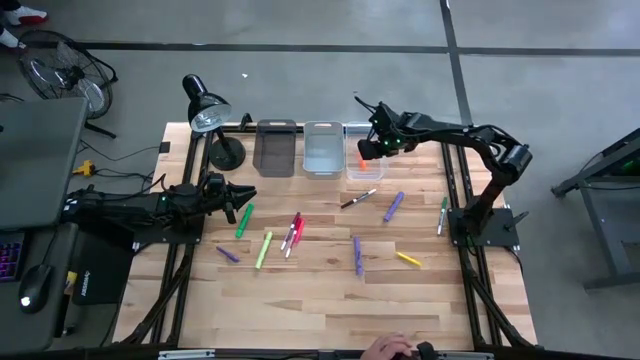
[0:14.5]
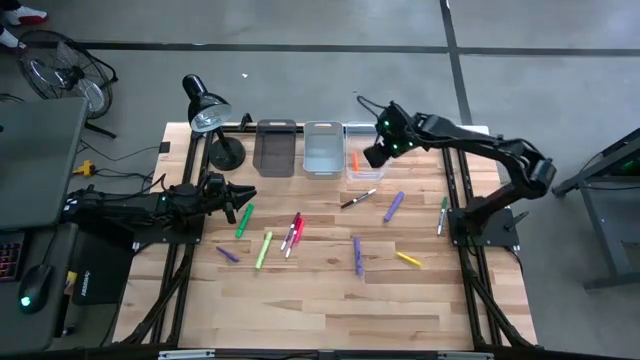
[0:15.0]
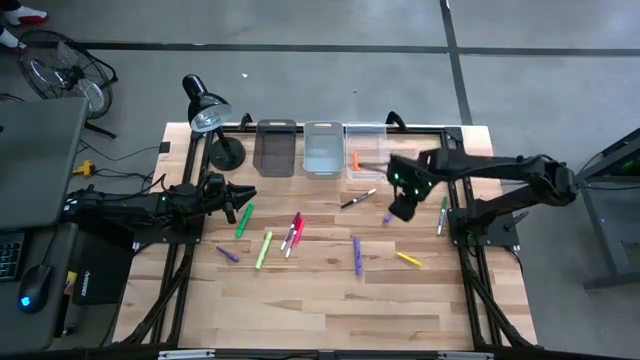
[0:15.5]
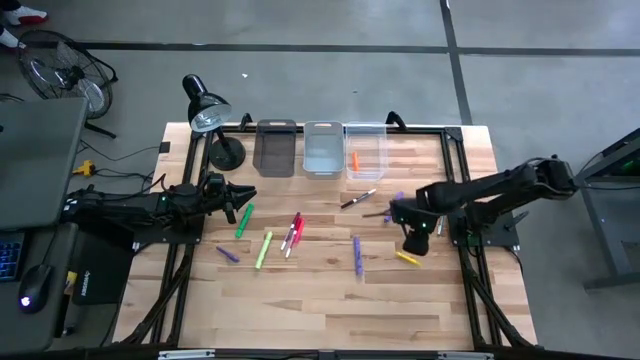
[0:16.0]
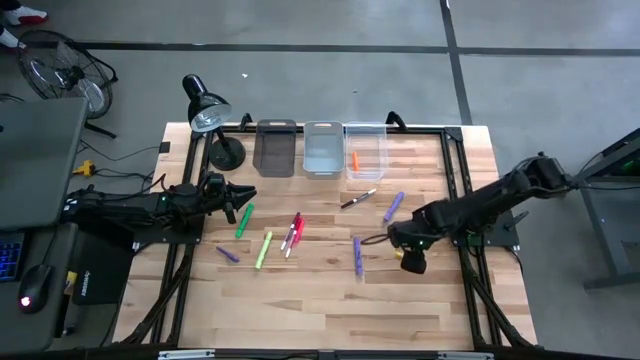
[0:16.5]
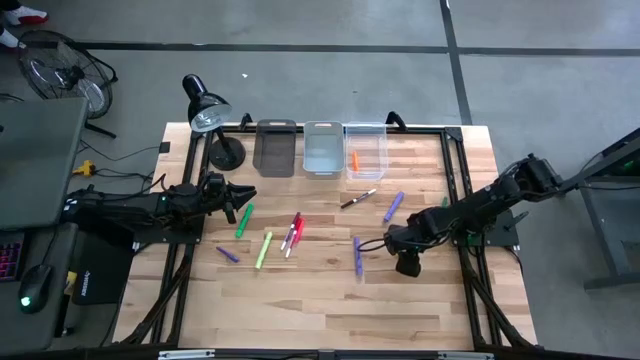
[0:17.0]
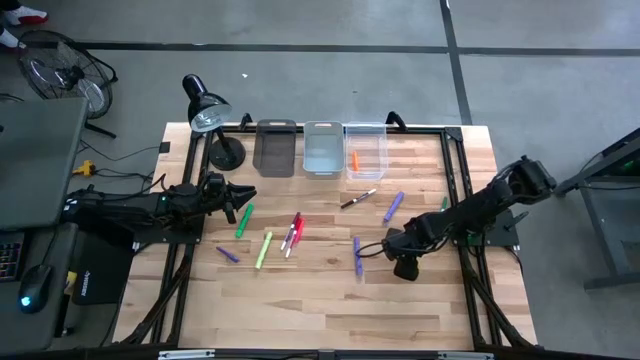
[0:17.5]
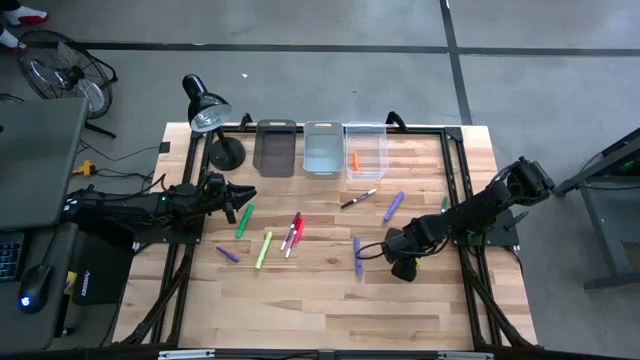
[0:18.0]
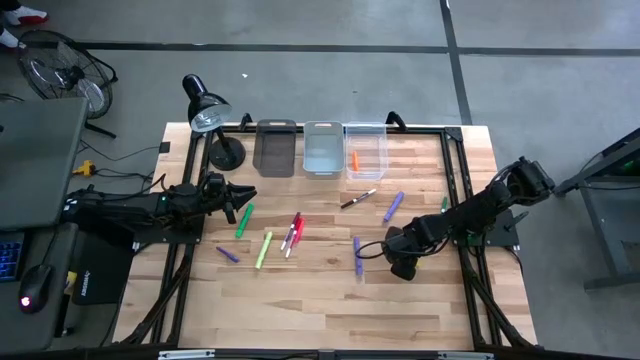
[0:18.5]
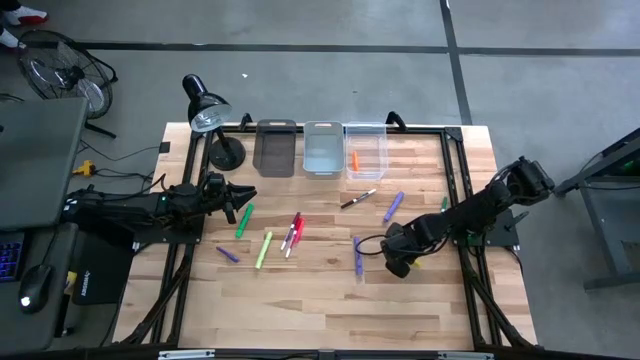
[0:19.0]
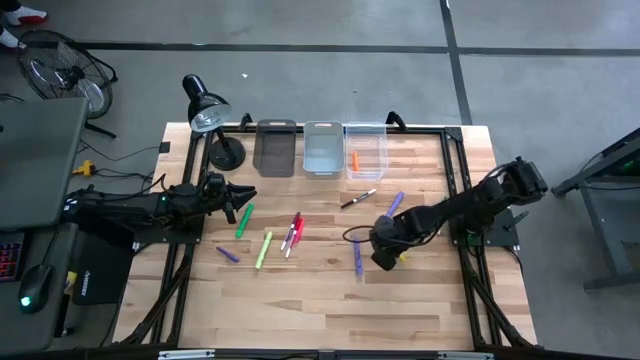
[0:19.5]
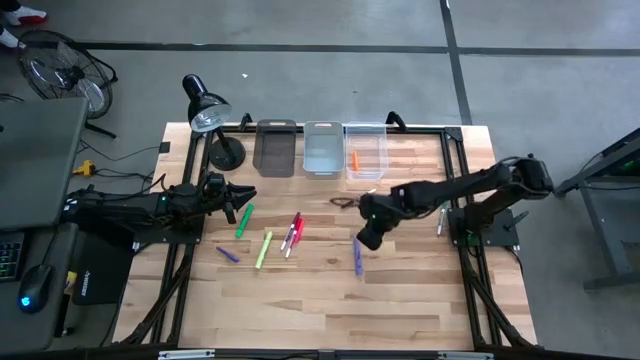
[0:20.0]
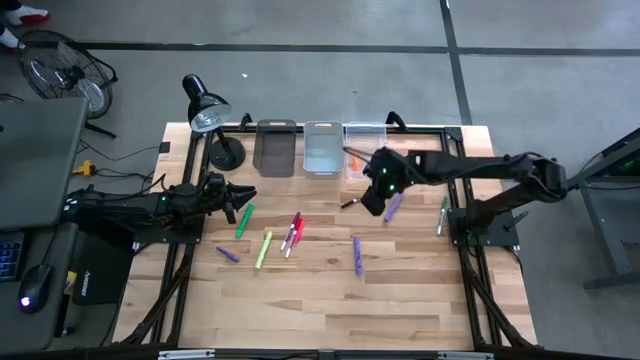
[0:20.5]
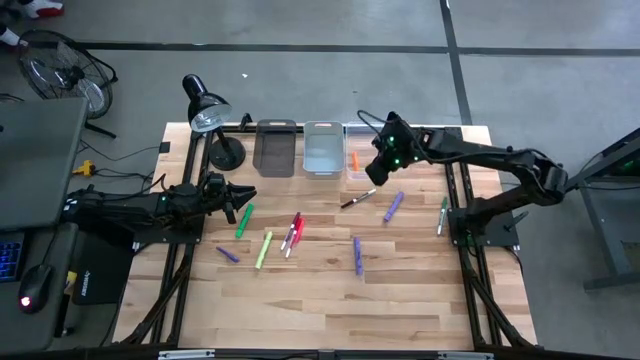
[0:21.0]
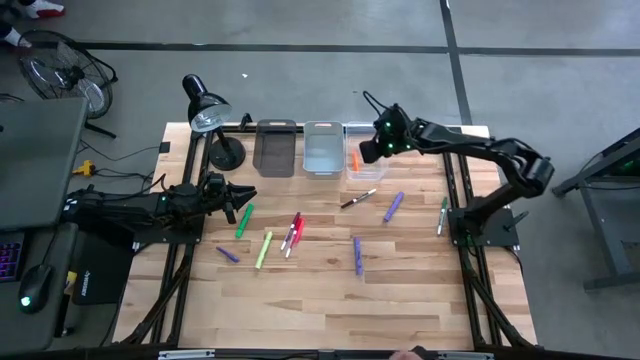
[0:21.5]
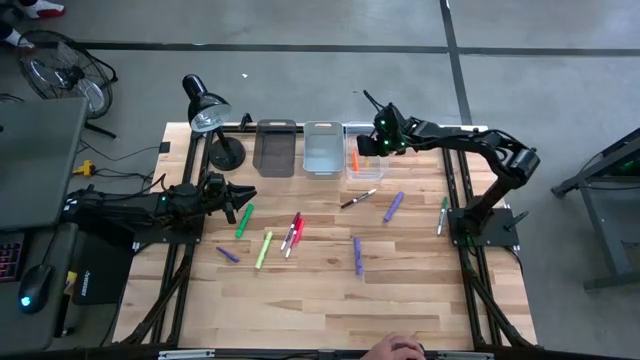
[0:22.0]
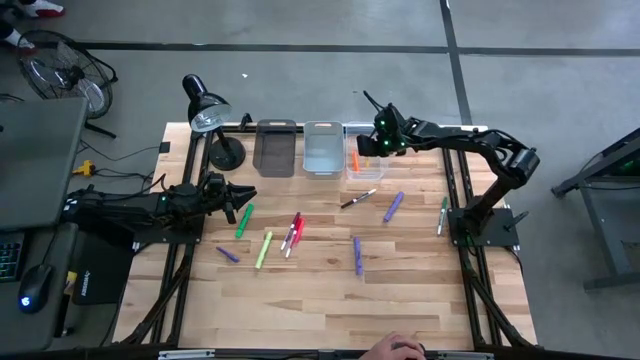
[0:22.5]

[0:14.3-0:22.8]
Task: Pick & Place Markers
Put the yellow pen into the transparent bin

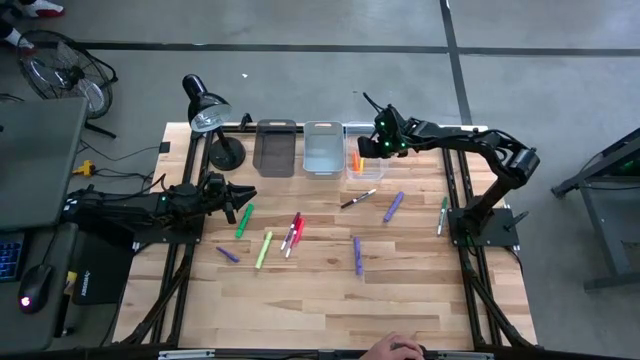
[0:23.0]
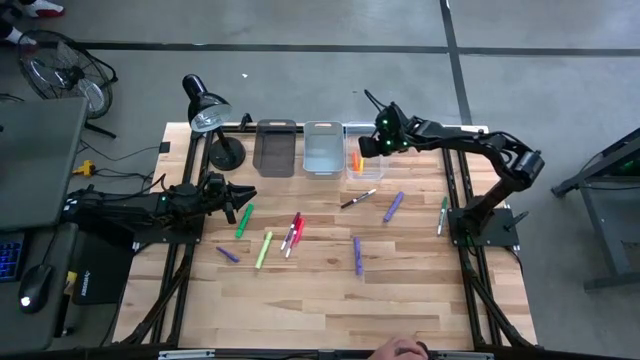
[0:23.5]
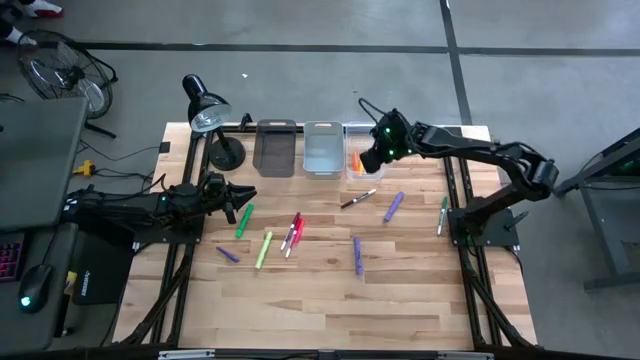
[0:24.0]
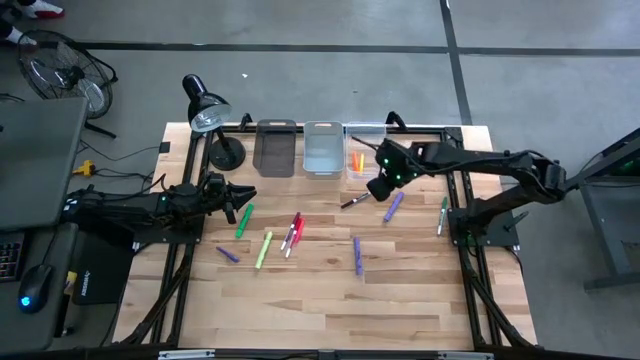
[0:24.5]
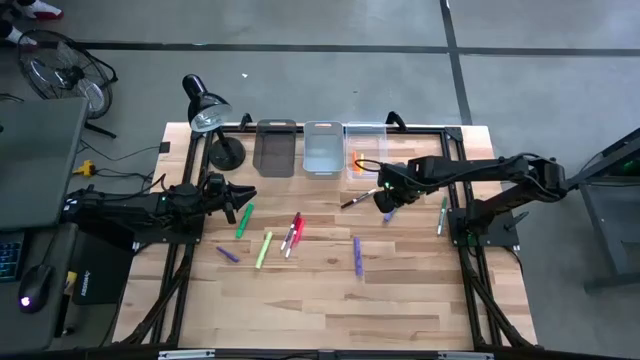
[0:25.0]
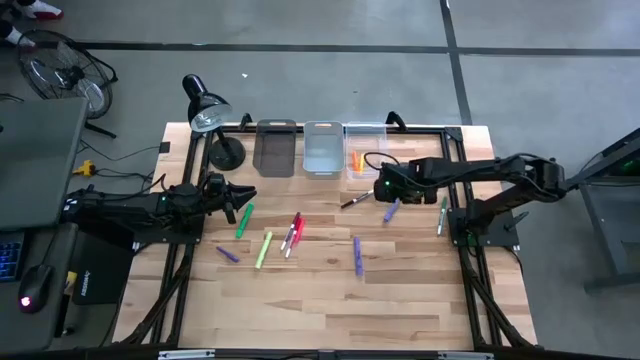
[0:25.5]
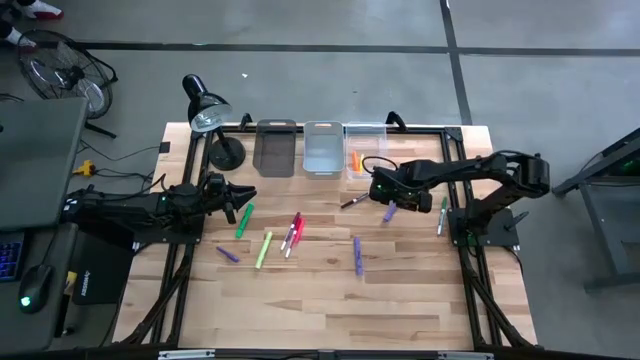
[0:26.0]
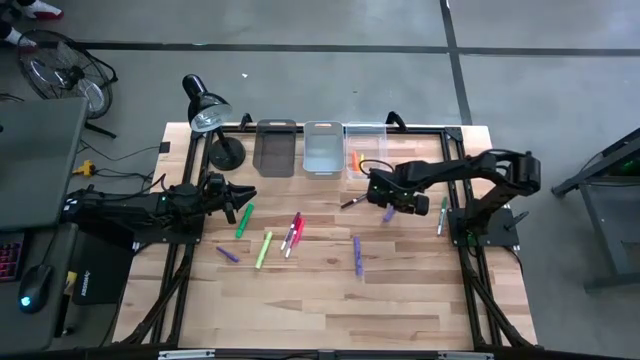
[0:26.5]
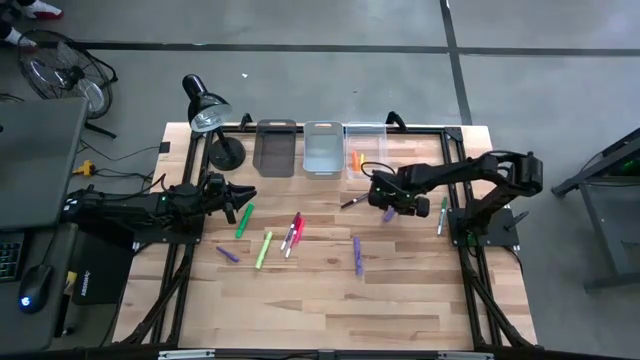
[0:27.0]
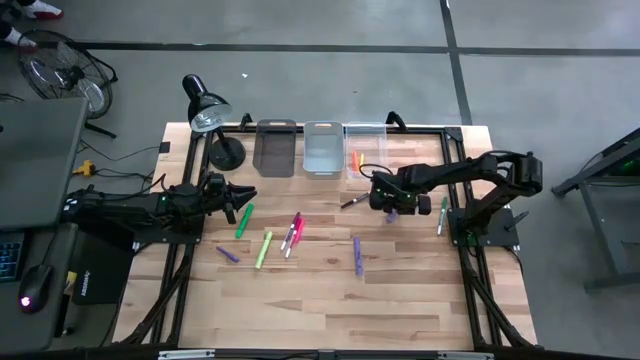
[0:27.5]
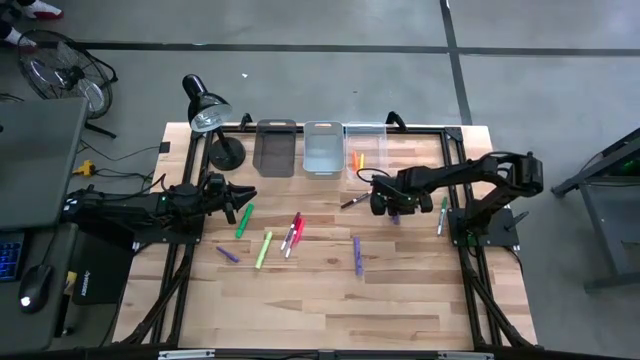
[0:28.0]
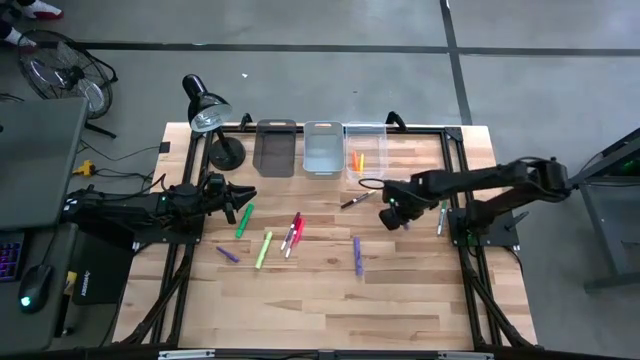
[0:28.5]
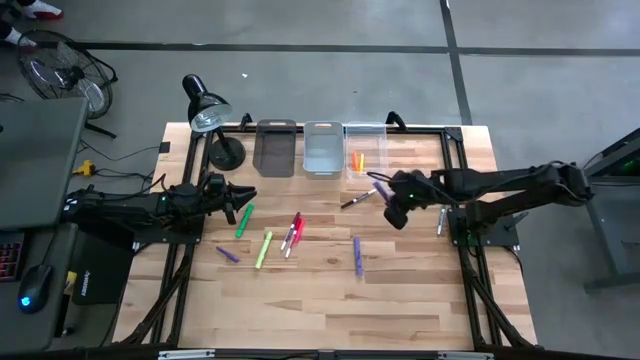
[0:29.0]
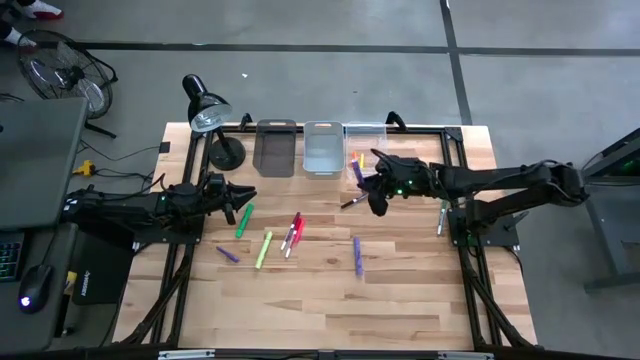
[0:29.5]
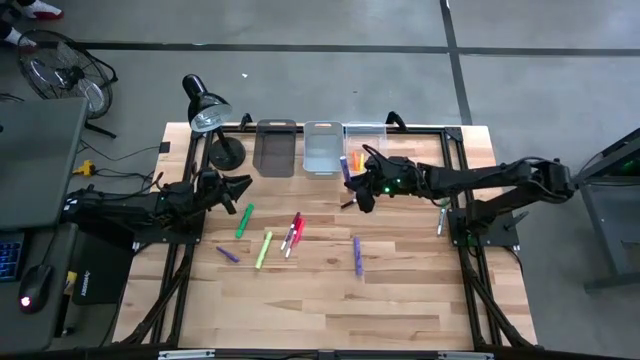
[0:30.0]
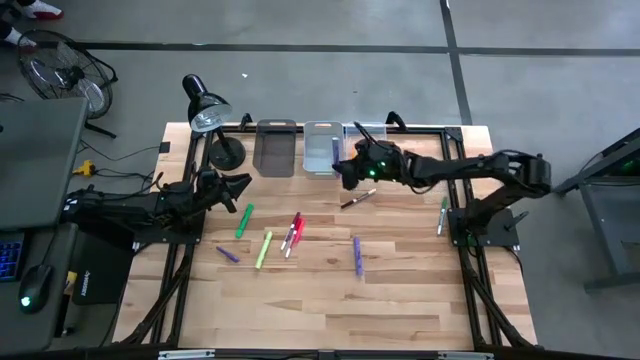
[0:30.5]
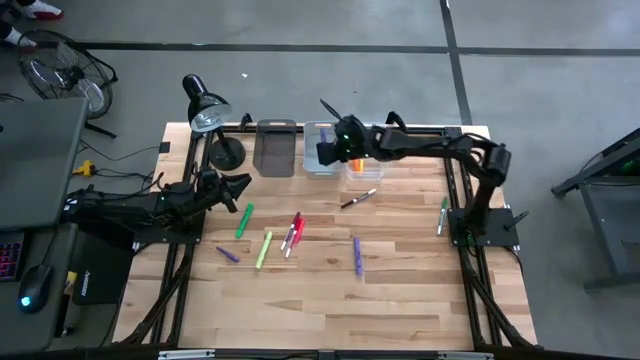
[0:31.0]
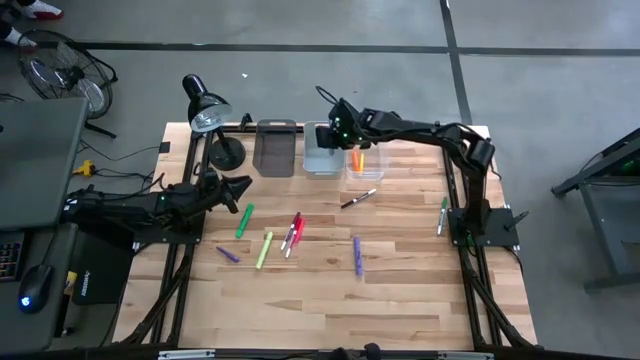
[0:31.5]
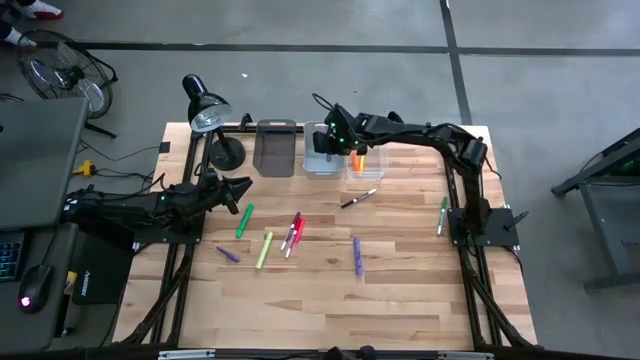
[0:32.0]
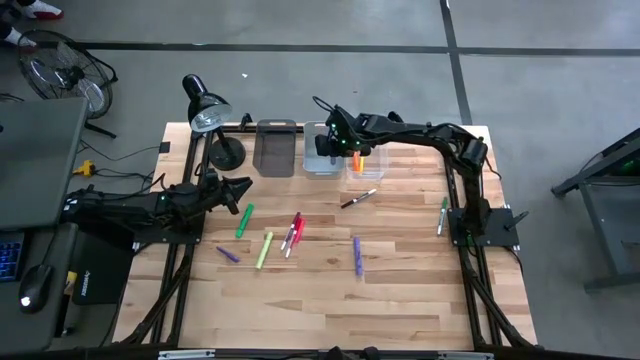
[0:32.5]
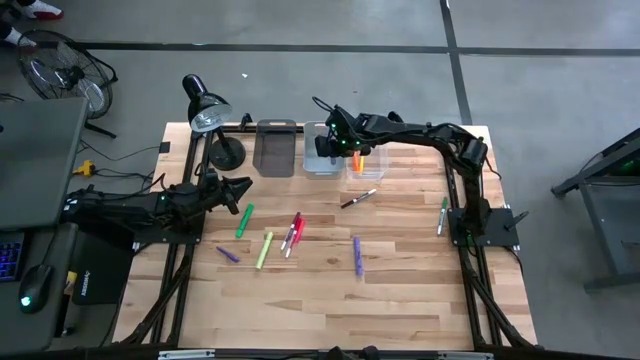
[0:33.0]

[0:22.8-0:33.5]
Put the top violet highlighter into the white bin

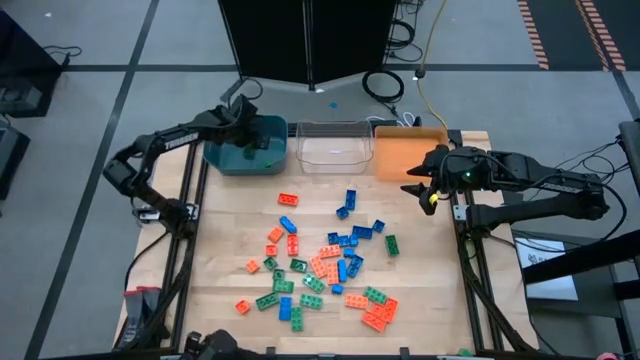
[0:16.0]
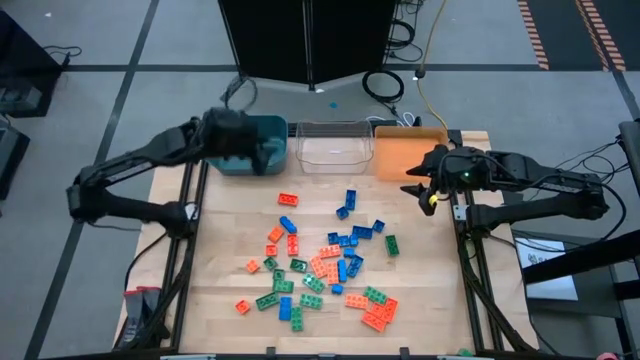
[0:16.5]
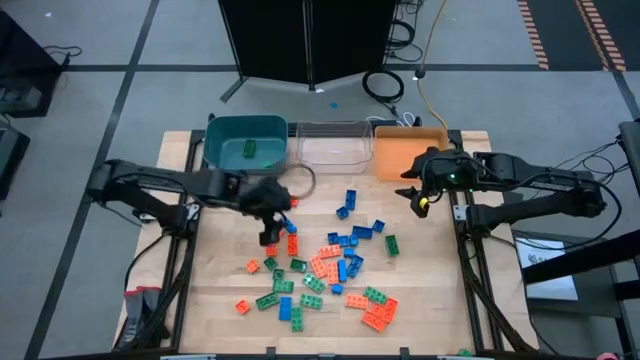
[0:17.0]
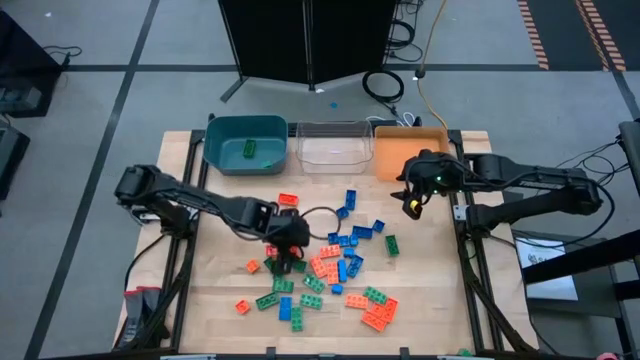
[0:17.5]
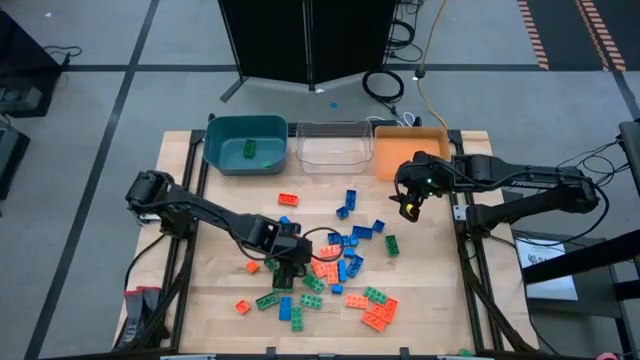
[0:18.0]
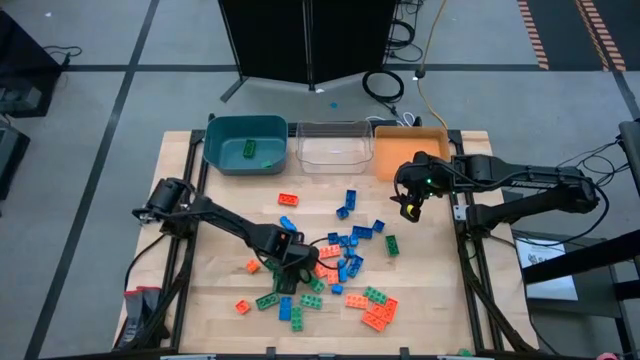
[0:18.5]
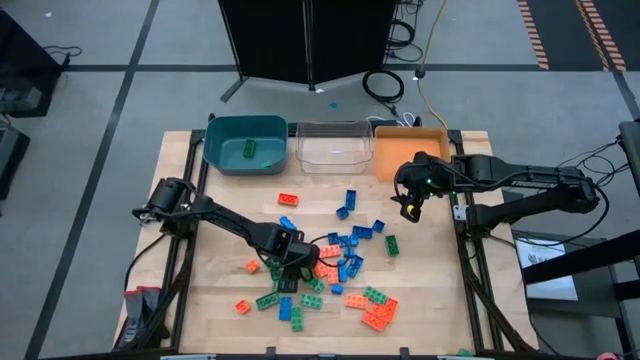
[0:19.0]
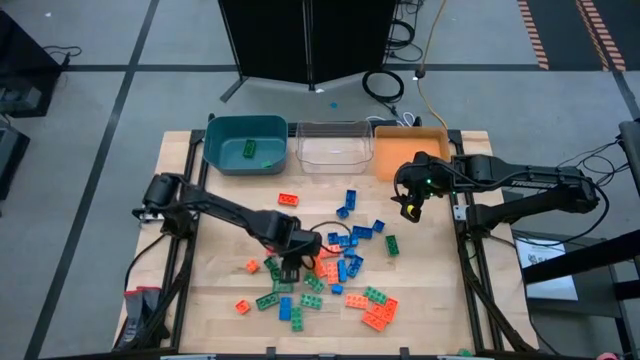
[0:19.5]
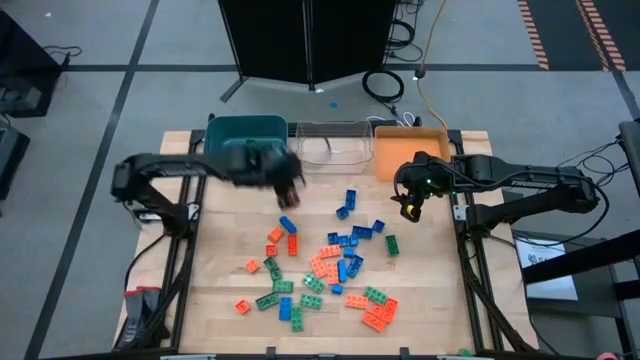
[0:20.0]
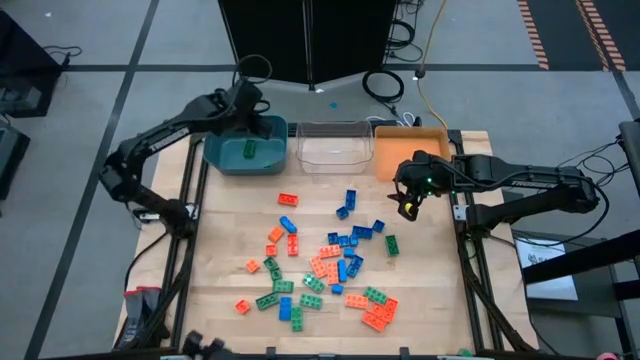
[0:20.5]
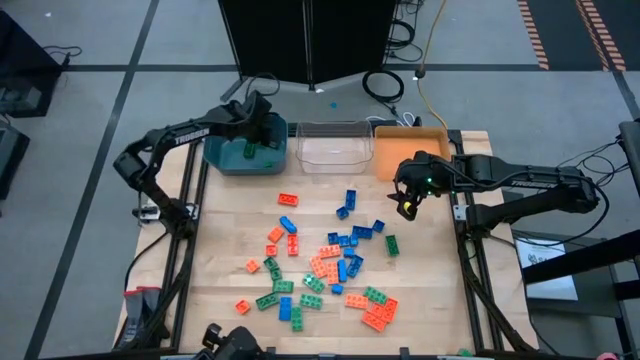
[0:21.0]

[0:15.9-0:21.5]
Task: Sort blocks
Put the green game piece into the blue bin
